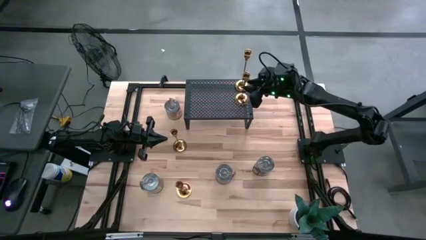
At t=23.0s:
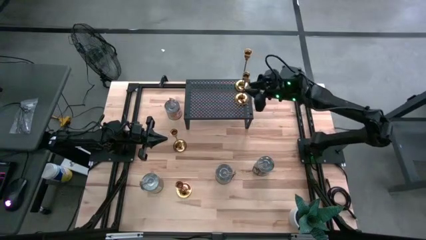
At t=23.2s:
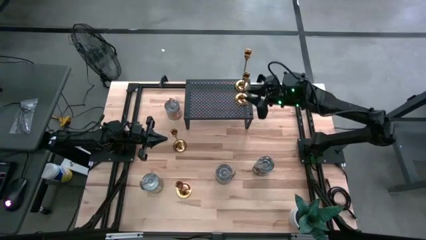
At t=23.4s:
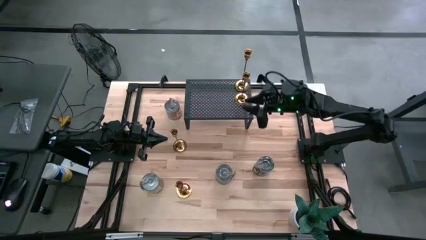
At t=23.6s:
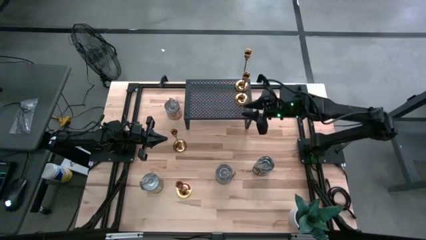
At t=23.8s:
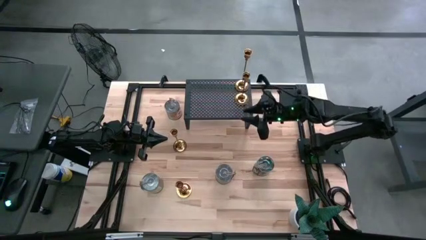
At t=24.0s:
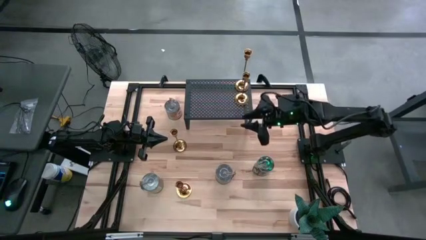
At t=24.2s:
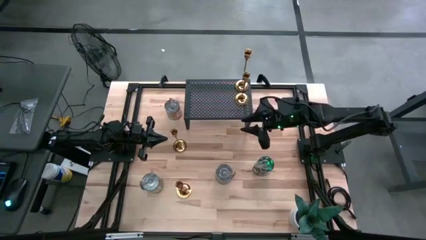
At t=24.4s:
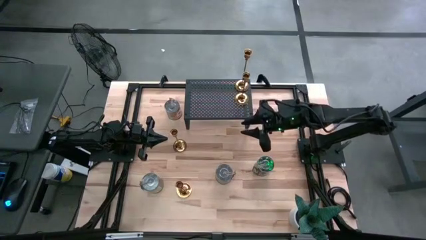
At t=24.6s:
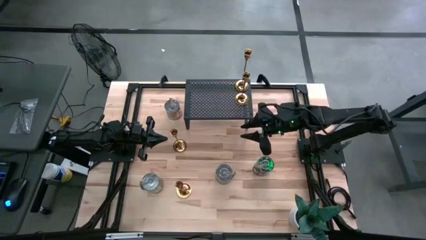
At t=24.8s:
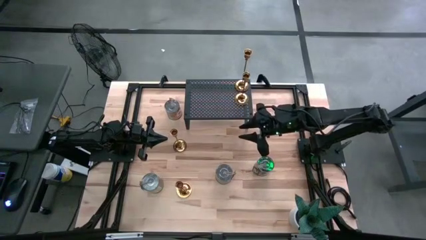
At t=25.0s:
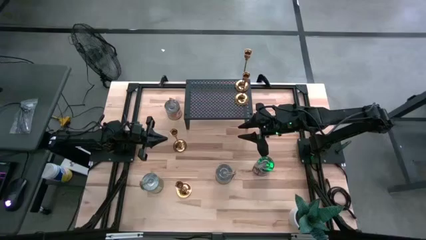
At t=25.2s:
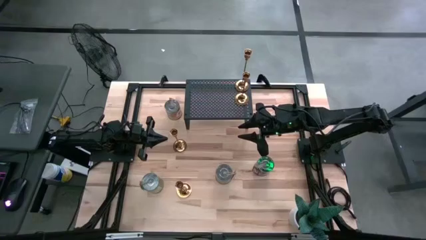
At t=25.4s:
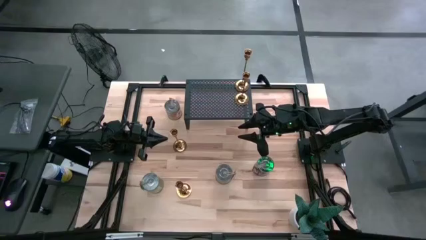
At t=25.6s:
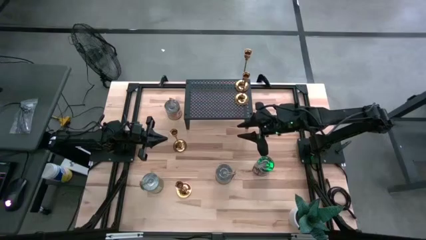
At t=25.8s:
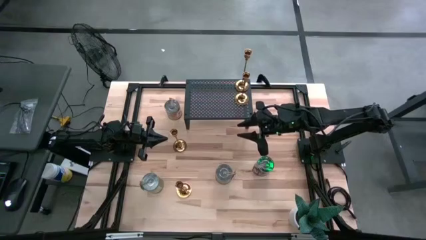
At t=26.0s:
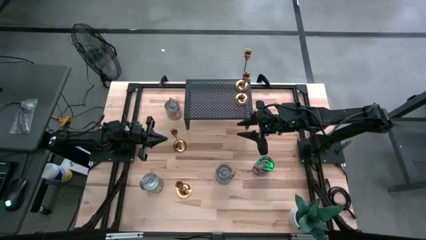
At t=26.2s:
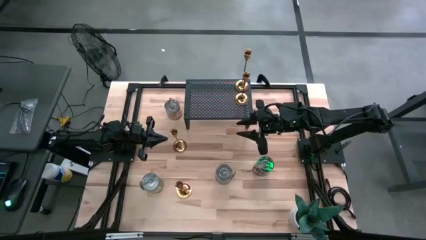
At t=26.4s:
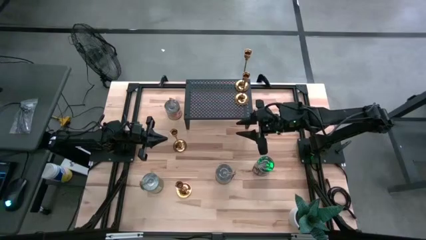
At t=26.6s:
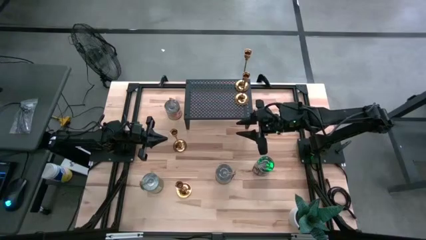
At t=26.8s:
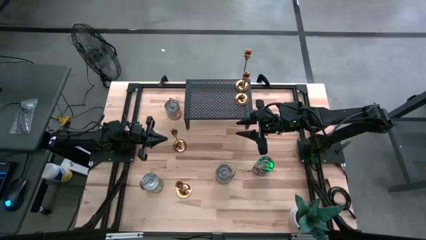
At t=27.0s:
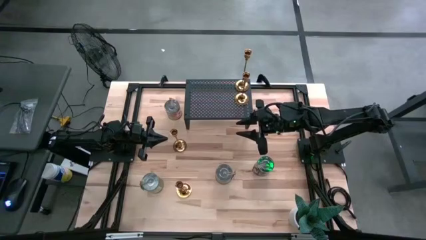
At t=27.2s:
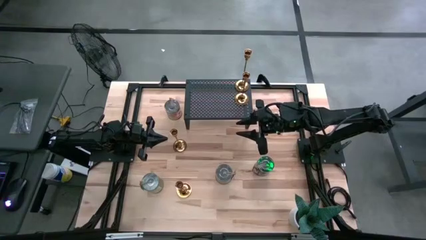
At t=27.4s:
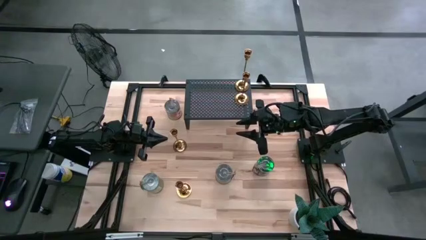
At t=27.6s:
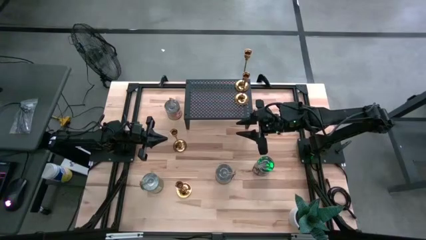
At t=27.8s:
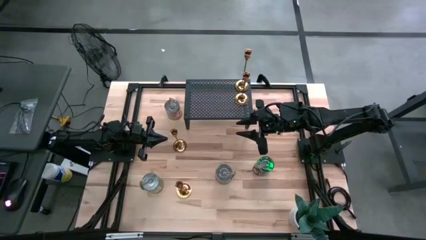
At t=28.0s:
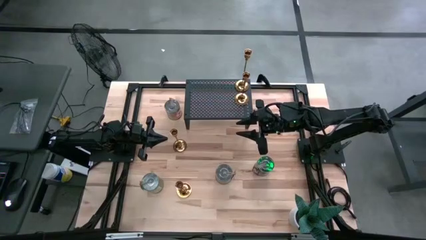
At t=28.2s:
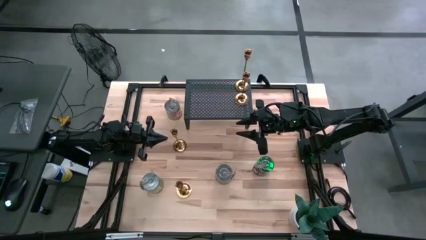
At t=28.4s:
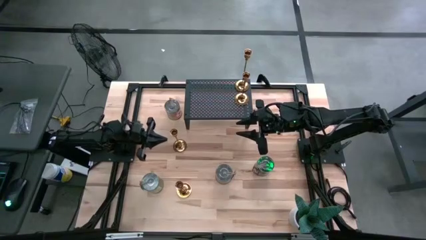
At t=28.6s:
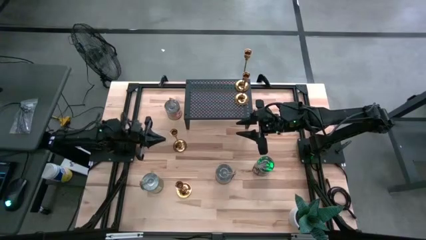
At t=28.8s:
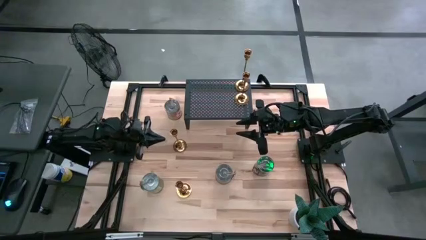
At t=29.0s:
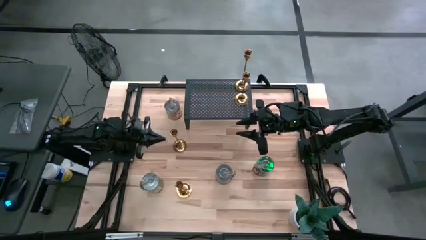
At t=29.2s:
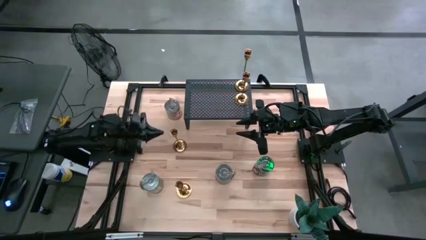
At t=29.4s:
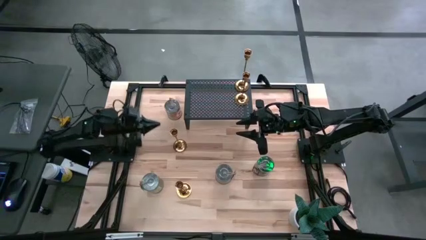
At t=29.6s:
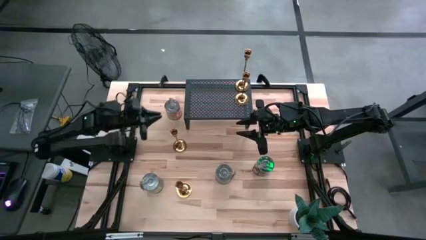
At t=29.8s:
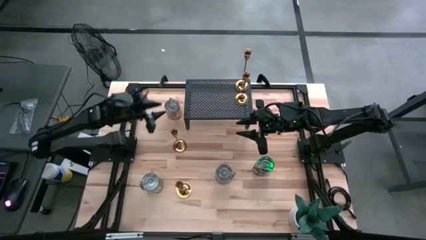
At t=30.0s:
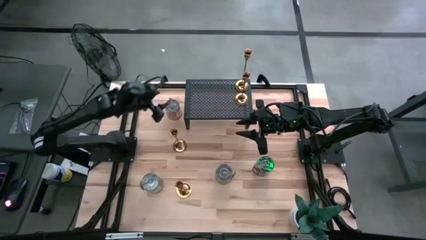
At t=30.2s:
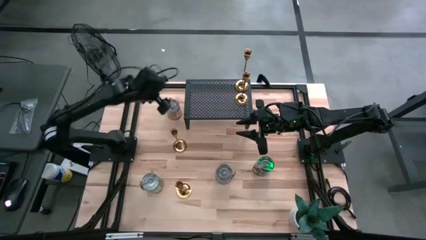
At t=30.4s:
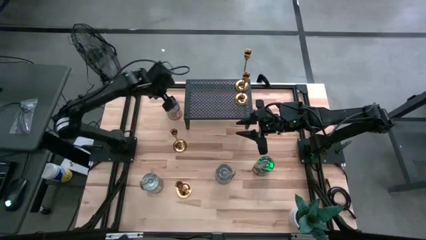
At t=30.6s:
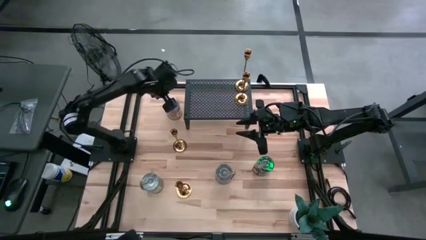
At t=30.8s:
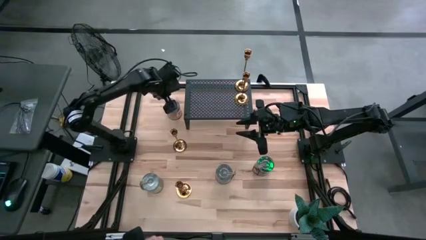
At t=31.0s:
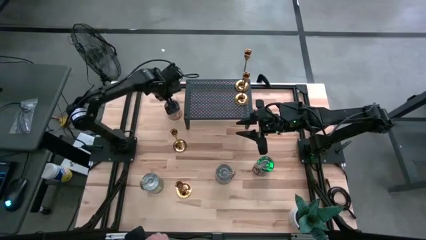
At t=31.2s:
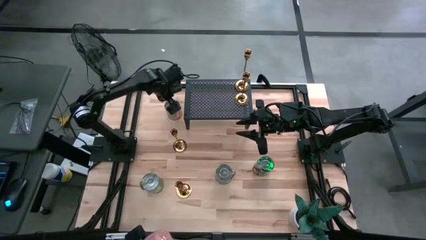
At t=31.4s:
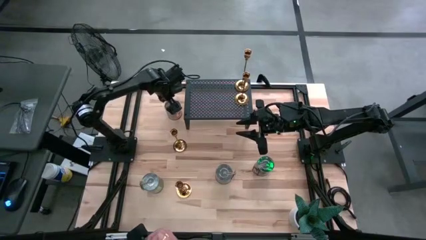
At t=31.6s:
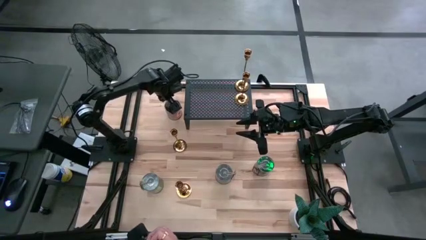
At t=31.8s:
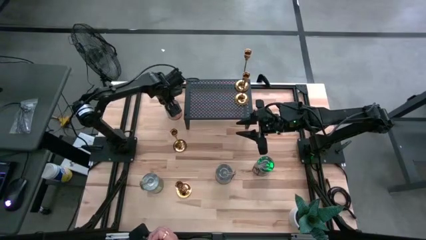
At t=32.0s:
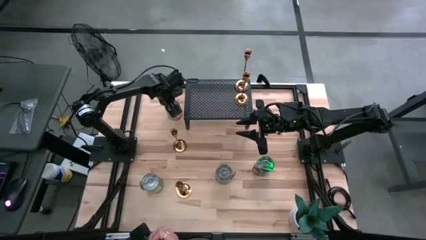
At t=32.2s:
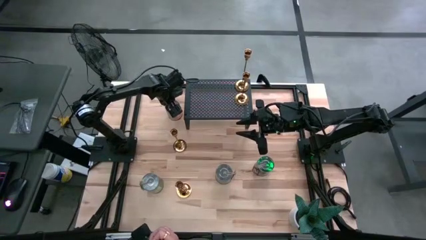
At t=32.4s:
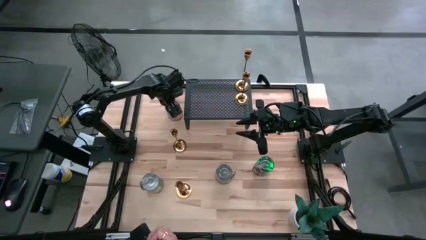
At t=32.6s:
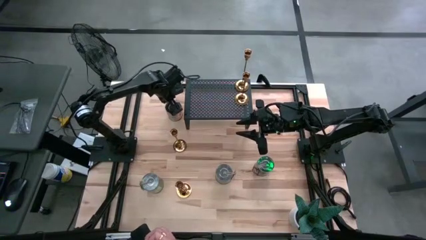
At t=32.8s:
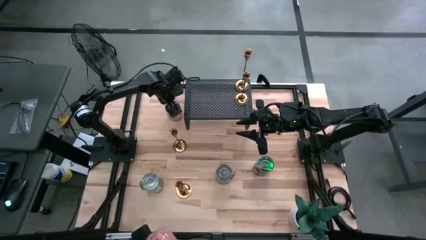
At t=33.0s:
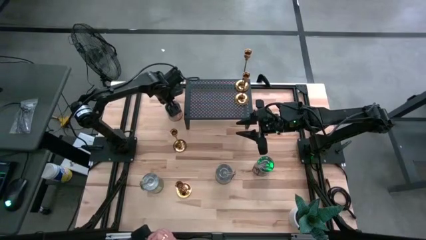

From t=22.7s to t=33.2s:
Task: Pick & Place candle stick holders
Put the orange scented candle on the shelf

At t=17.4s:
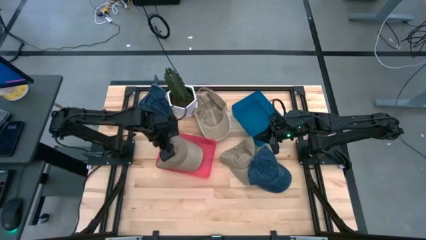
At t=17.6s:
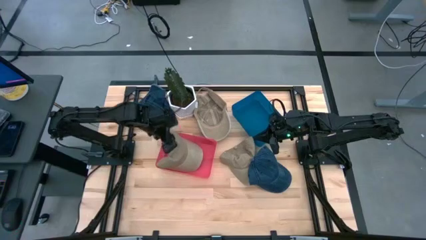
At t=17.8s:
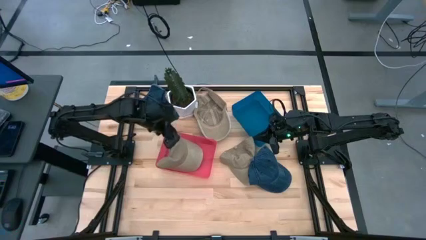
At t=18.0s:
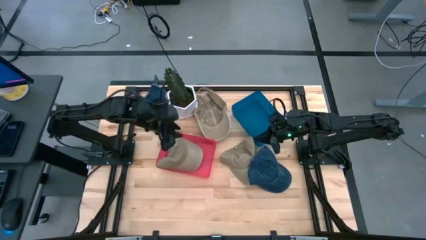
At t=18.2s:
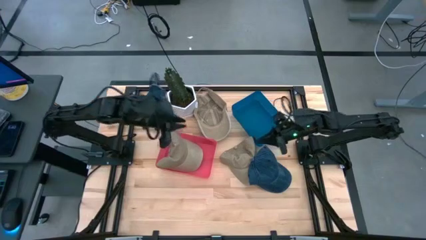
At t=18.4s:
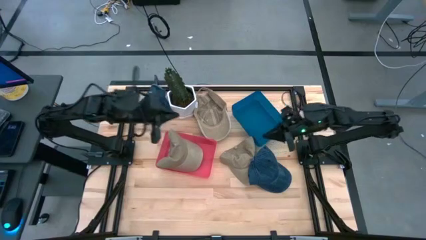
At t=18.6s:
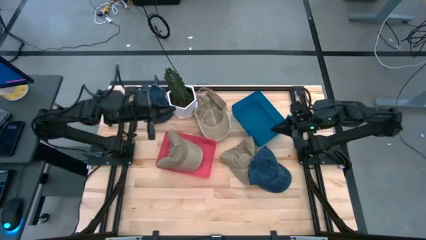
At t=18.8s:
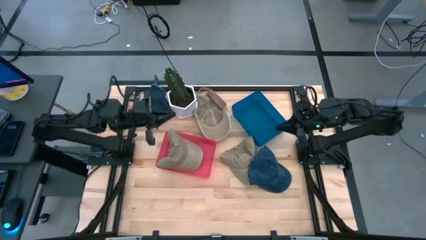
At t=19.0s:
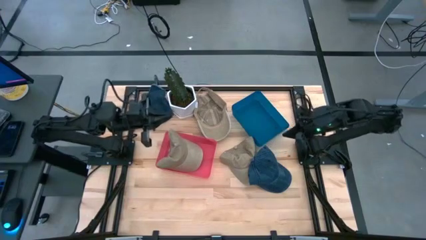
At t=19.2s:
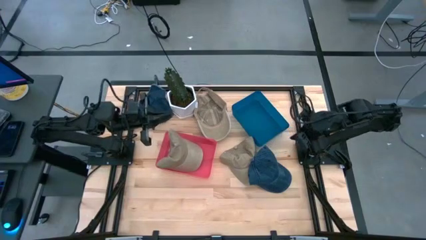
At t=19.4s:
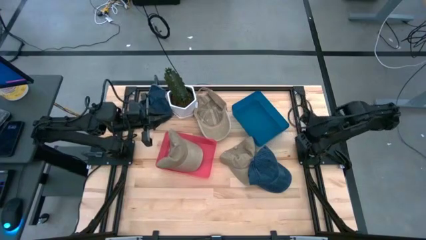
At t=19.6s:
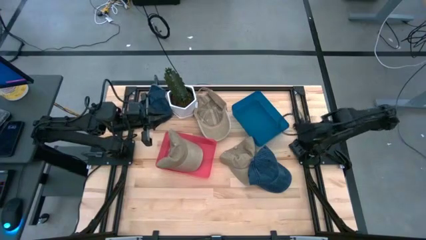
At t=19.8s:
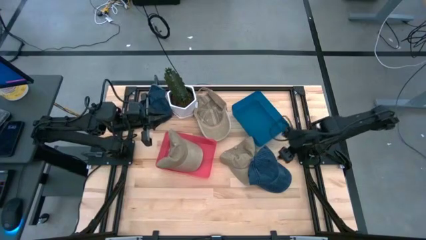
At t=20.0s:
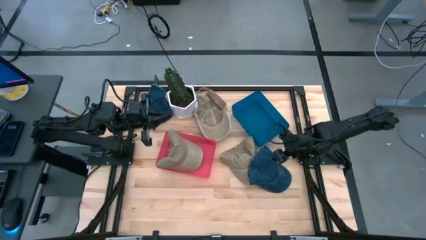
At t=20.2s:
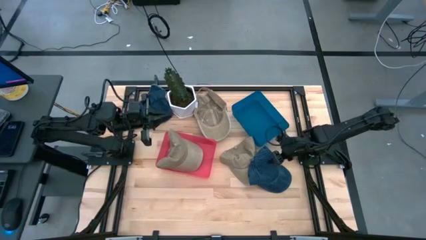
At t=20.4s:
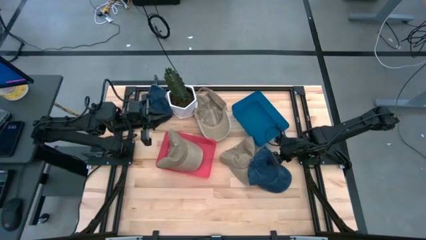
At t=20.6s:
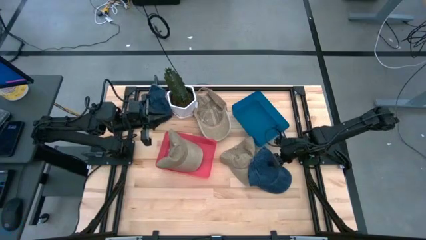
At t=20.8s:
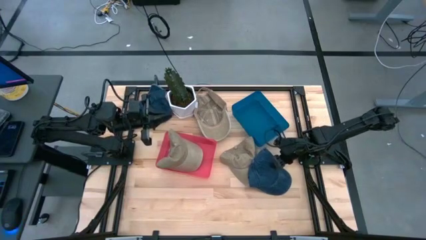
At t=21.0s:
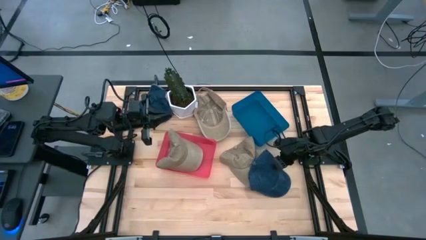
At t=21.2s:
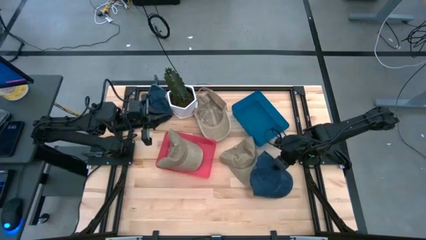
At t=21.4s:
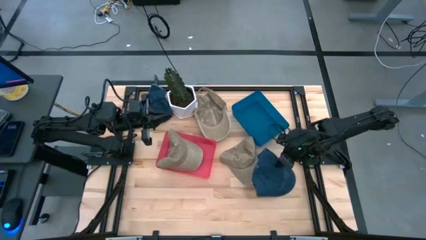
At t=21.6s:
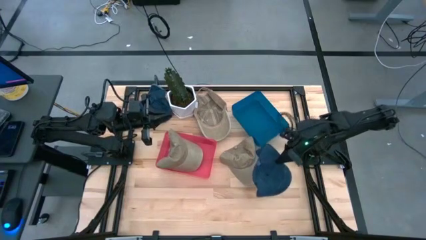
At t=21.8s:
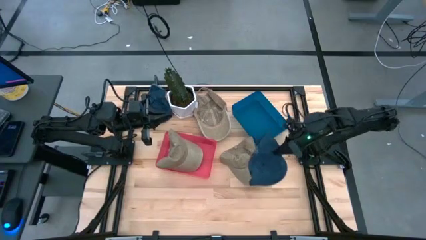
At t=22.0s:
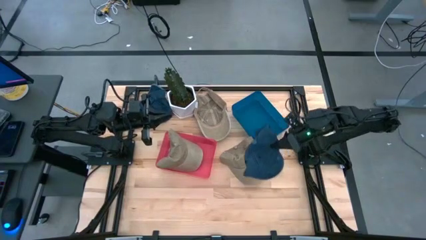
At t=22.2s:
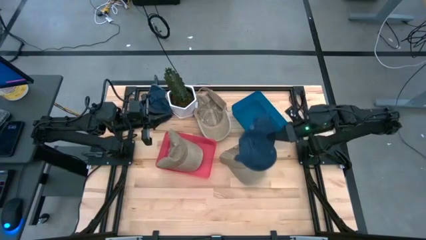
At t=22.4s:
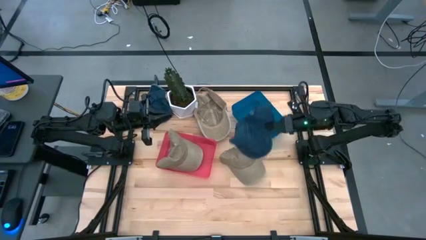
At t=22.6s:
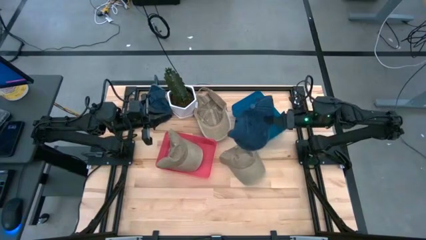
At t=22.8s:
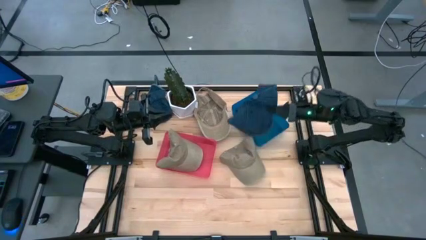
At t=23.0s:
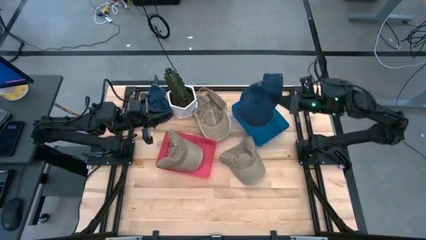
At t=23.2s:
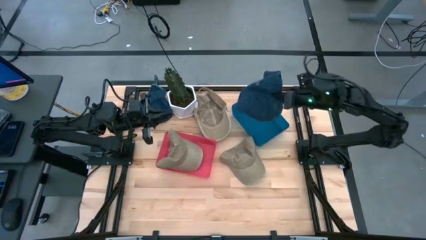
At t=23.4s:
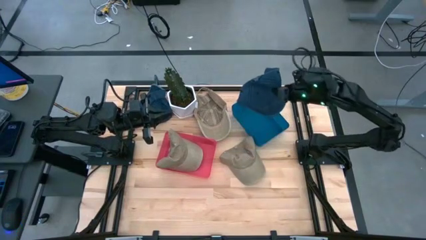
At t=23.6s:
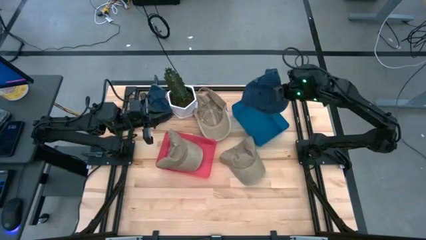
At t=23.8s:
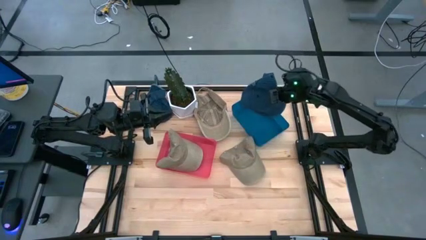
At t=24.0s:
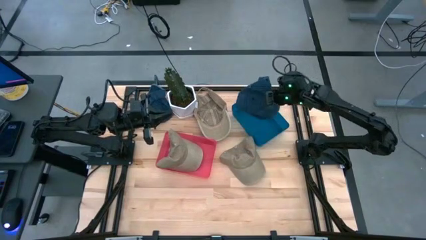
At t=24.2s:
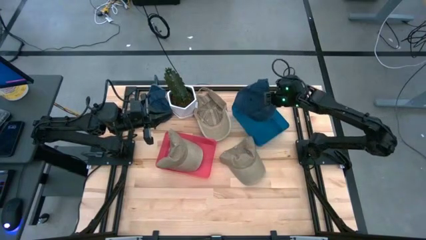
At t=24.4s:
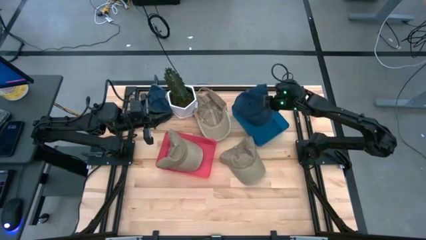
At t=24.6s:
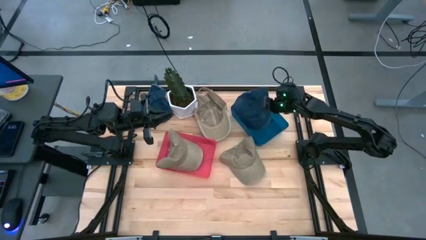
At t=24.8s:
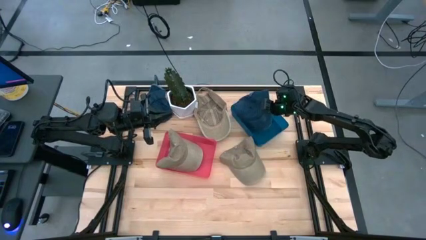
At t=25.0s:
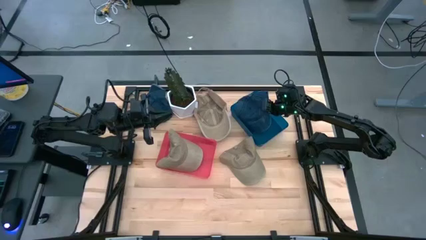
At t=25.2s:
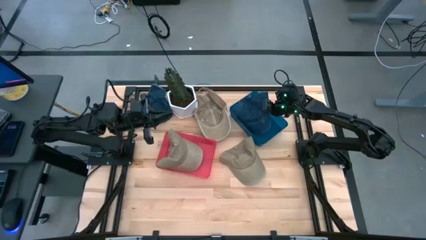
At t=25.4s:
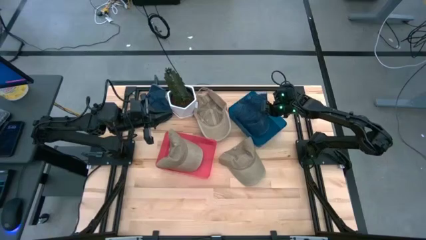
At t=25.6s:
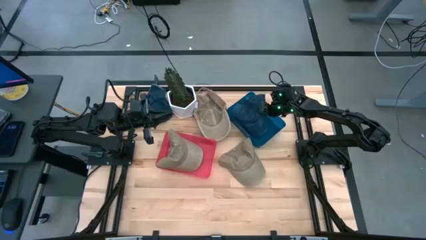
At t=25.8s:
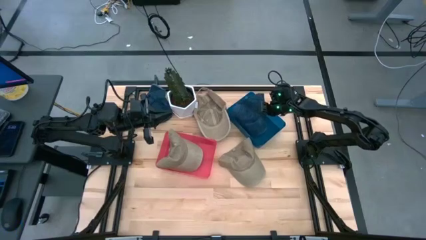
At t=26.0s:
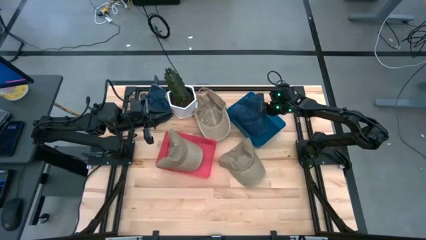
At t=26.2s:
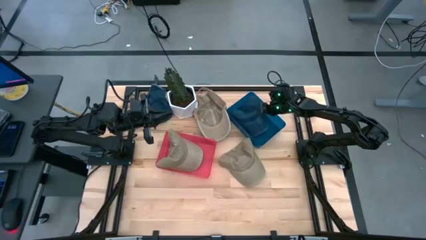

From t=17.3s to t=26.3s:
Task: Pick & Place hat
Put the right blue cap into the blue bin
